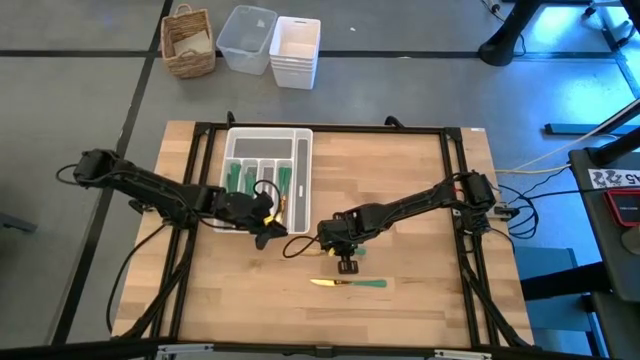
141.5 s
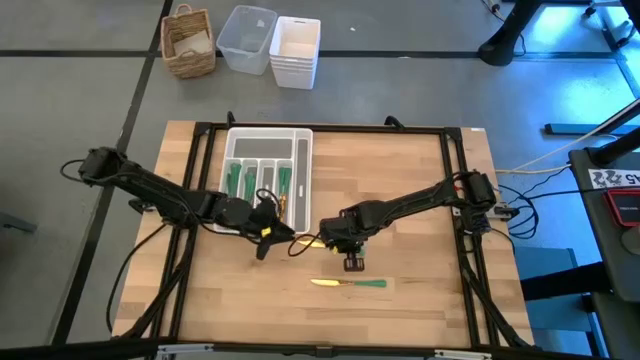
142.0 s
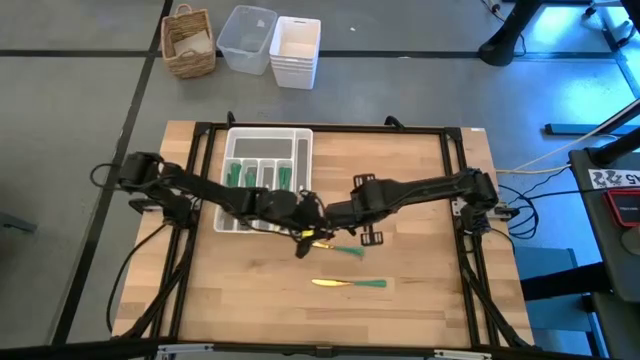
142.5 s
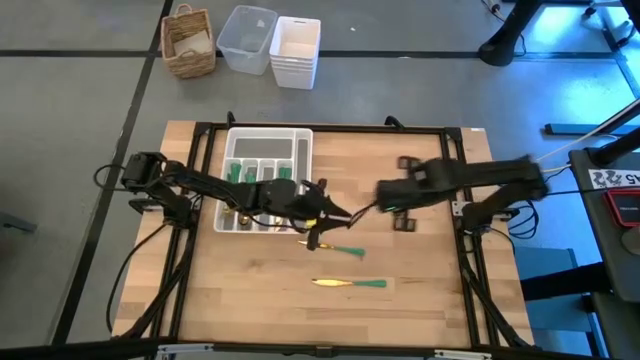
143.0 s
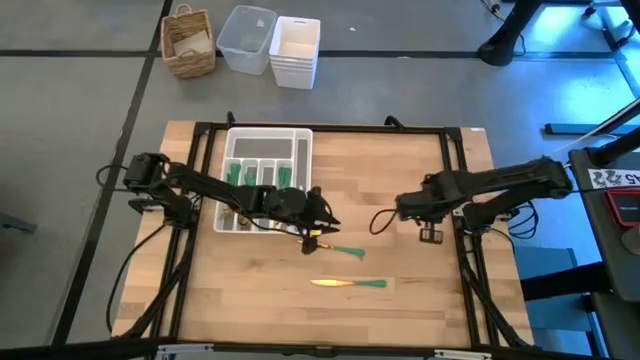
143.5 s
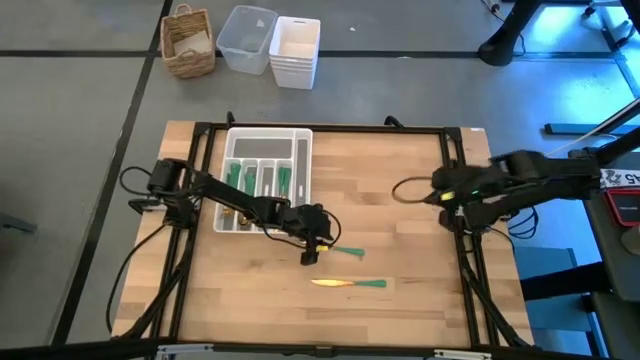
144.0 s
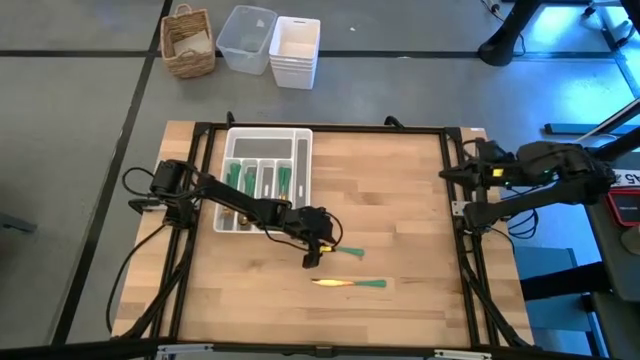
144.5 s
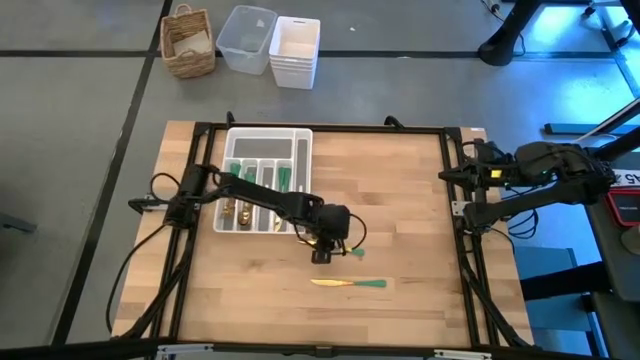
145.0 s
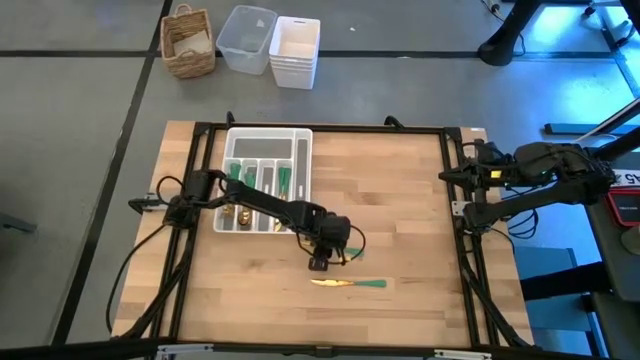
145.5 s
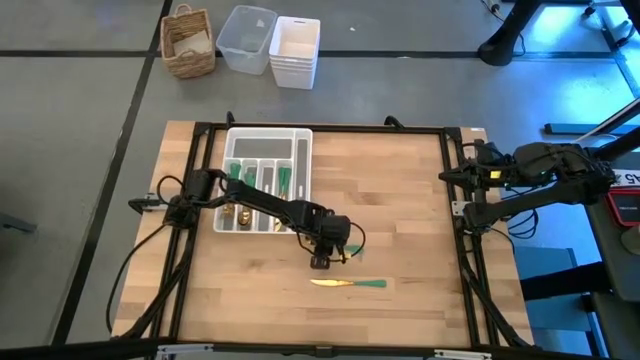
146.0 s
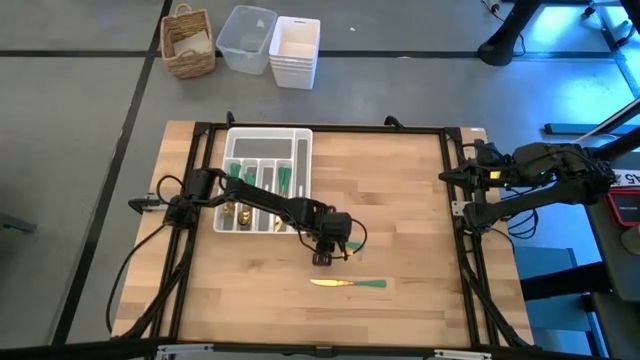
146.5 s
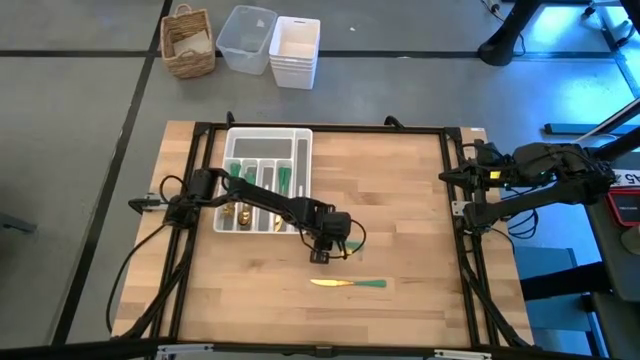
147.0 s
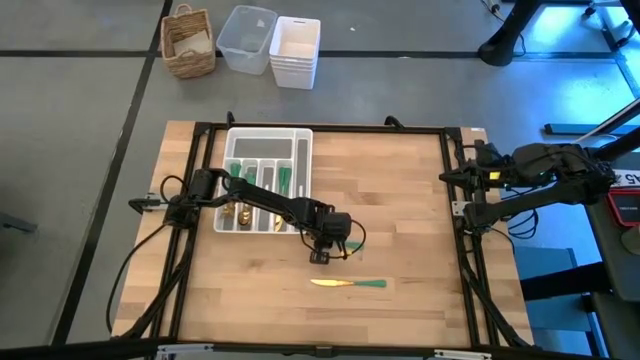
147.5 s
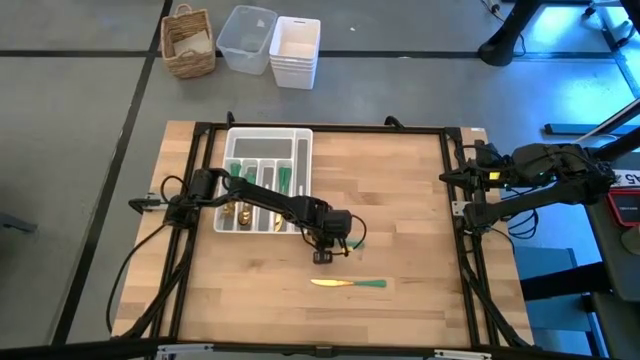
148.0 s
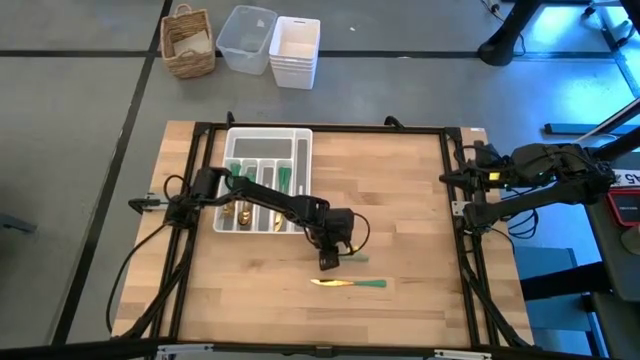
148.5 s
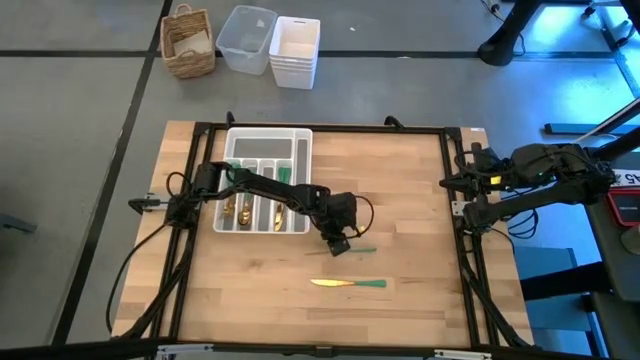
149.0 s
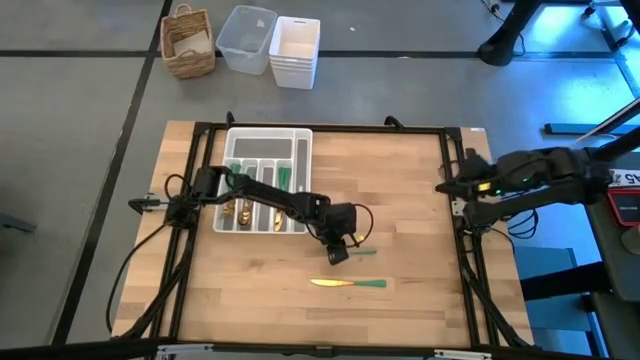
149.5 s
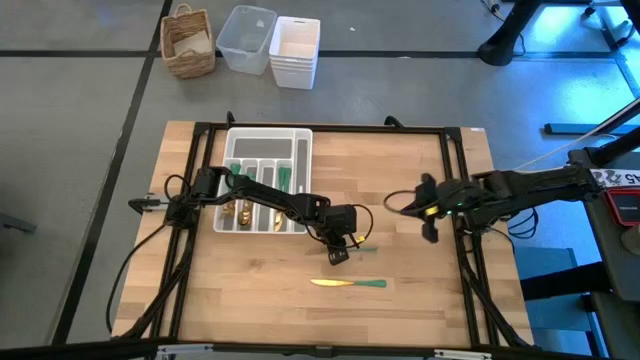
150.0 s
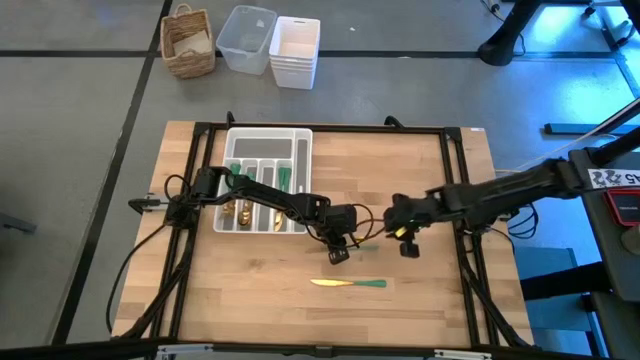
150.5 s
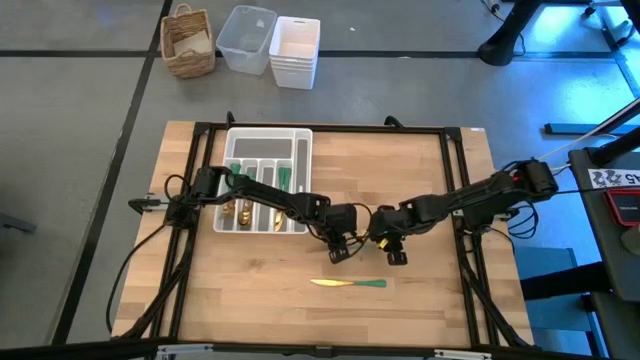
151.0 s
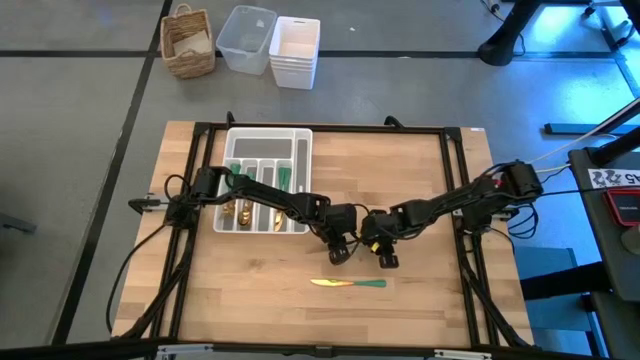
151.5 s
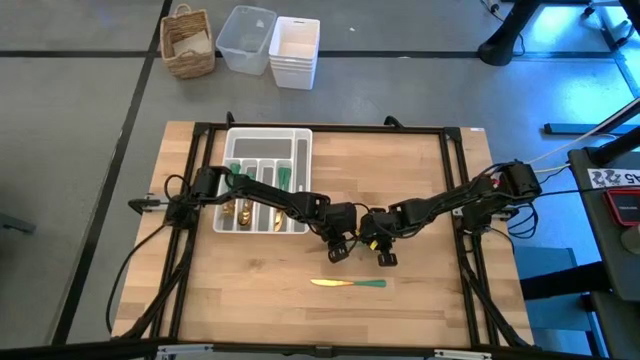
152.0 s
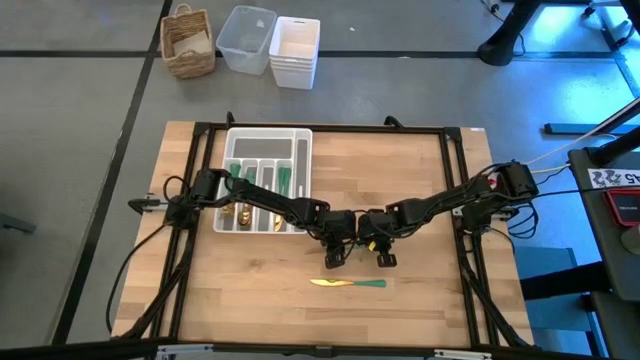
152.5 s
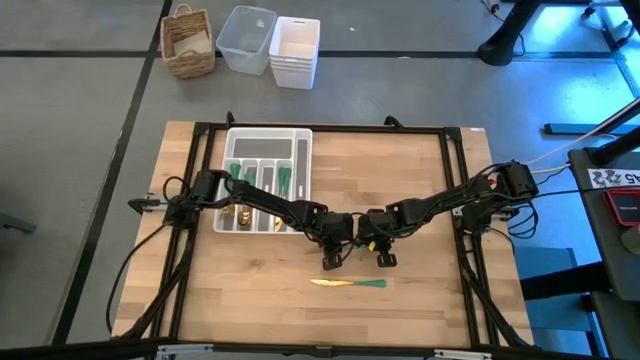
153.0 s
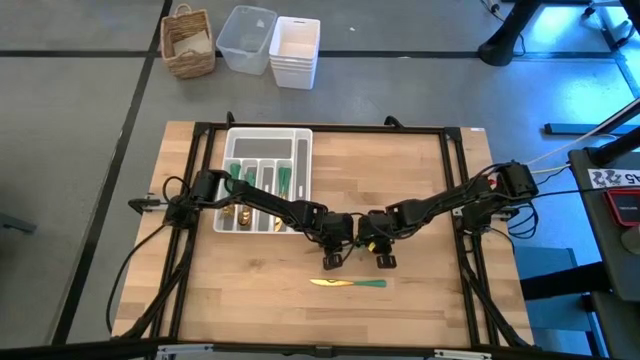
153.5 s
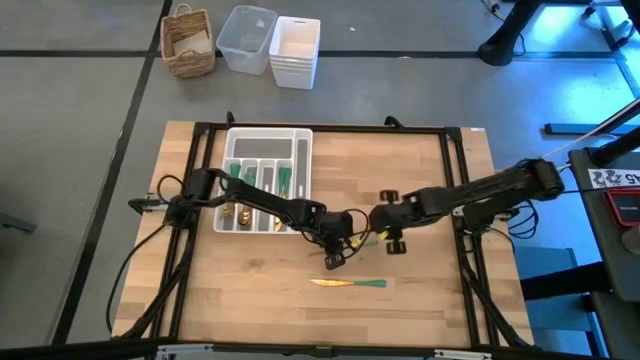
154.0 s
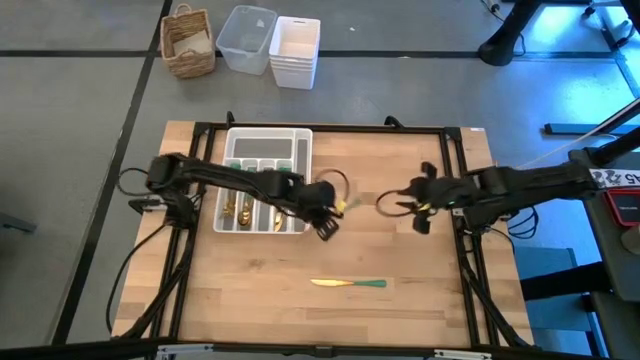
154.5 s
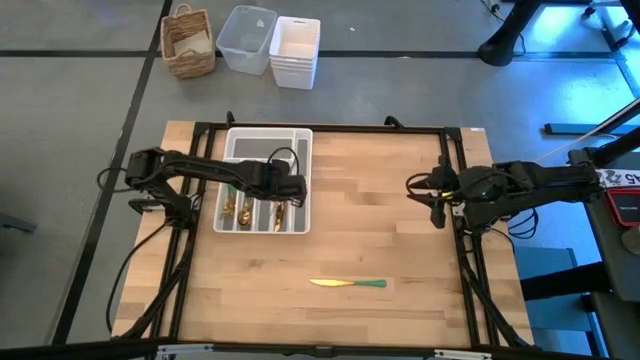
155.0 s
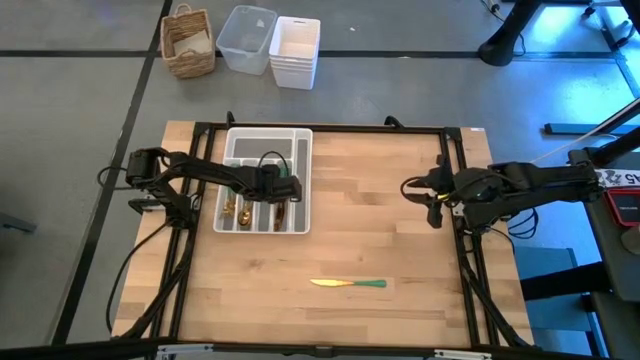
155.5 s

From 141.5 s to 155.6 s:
Task: Sort silverware
Put the green knife into the white silverware tray

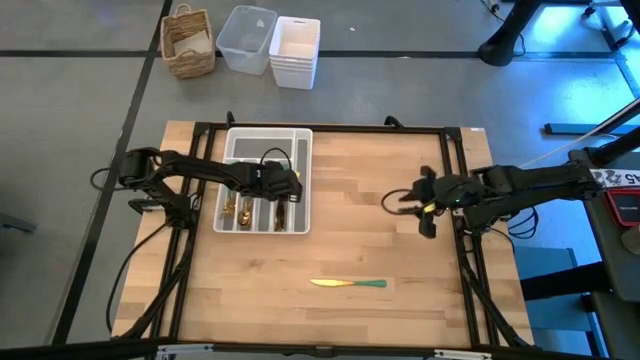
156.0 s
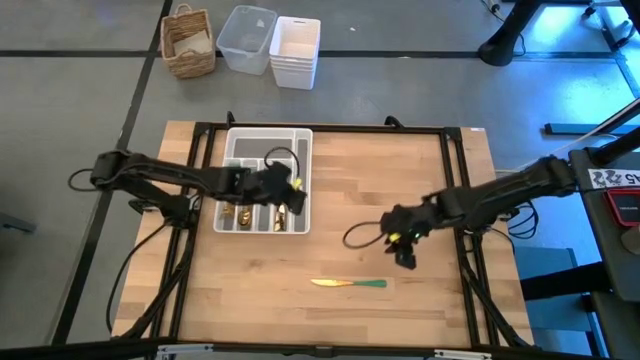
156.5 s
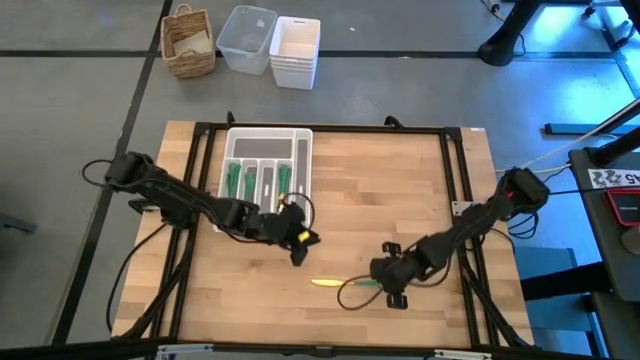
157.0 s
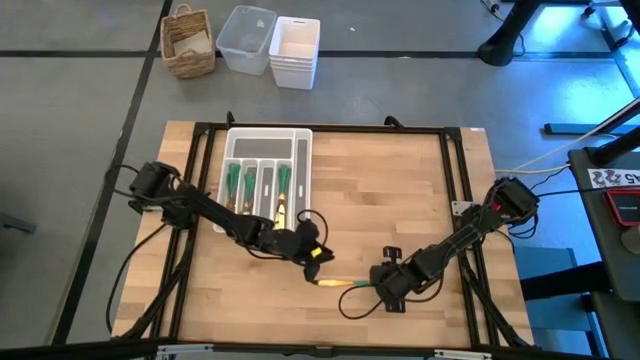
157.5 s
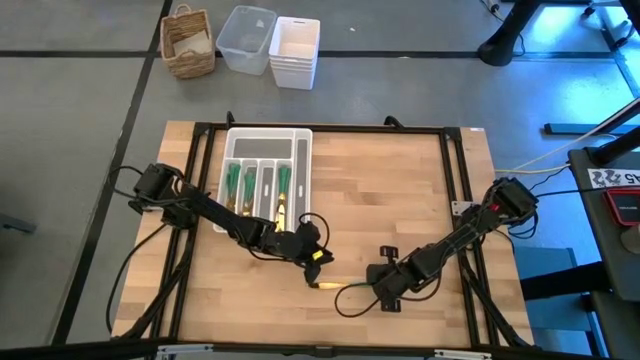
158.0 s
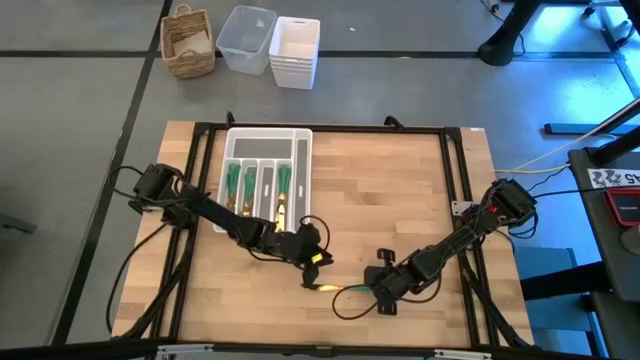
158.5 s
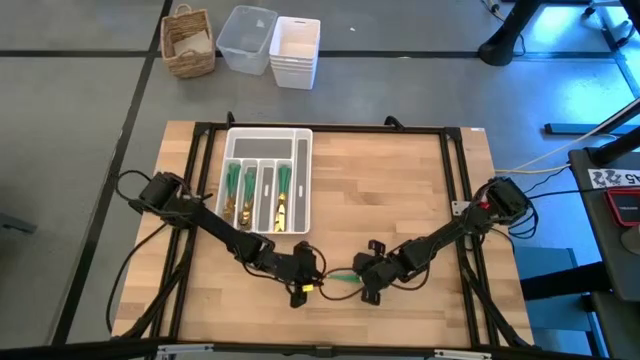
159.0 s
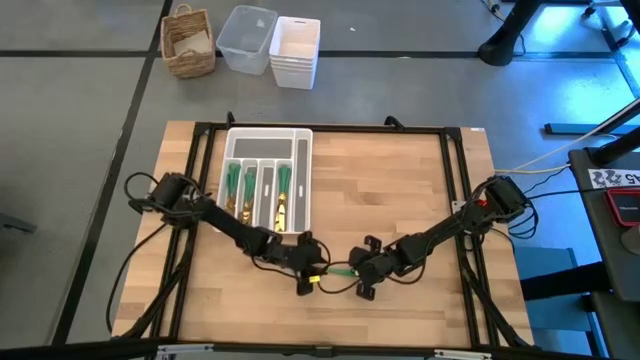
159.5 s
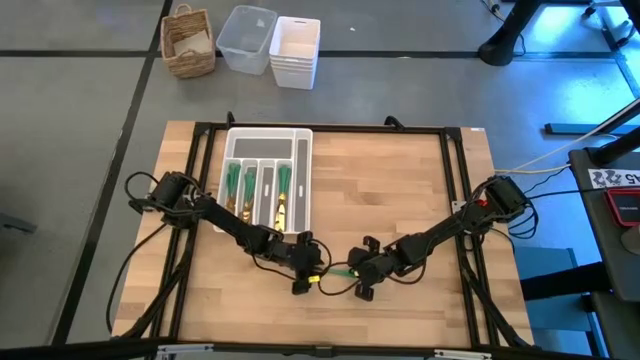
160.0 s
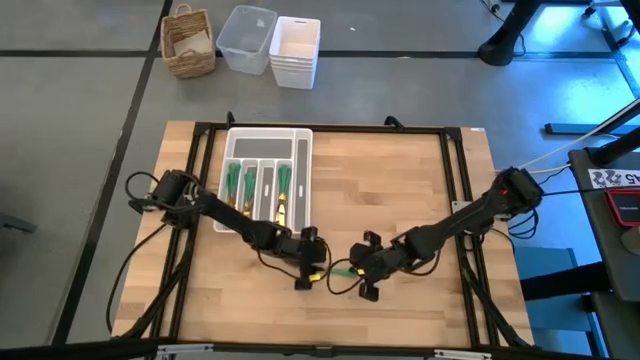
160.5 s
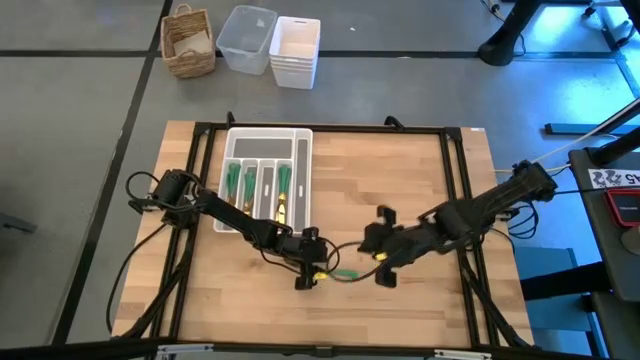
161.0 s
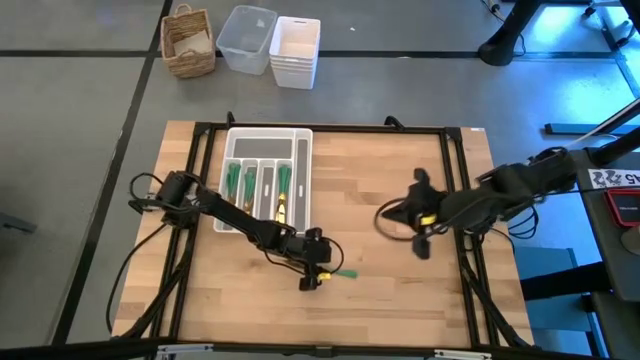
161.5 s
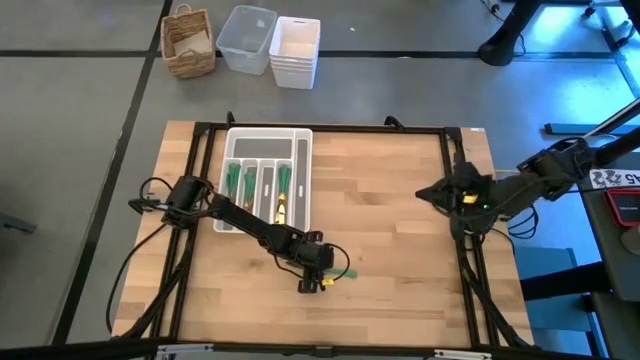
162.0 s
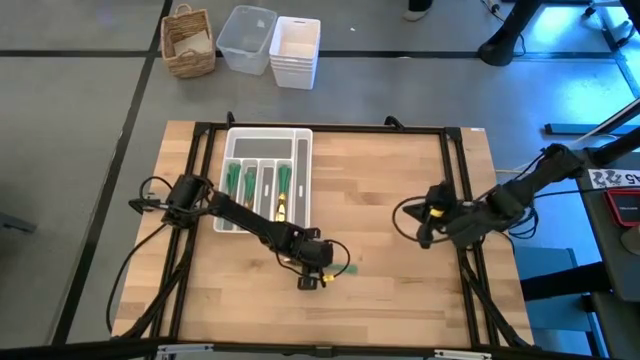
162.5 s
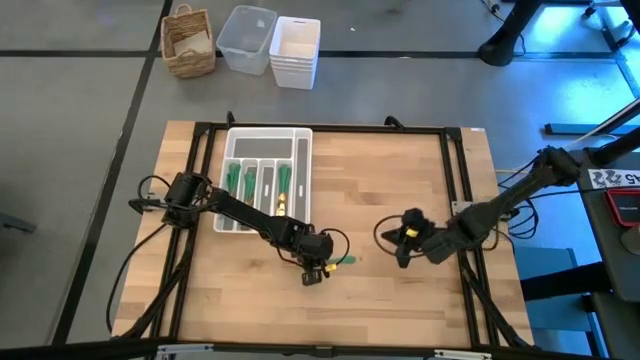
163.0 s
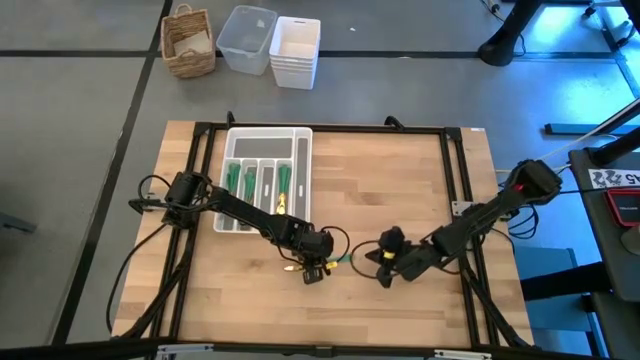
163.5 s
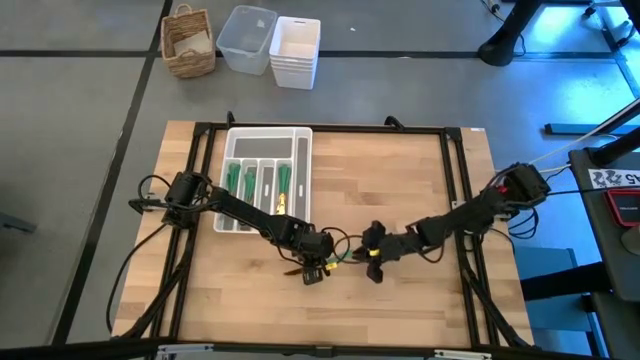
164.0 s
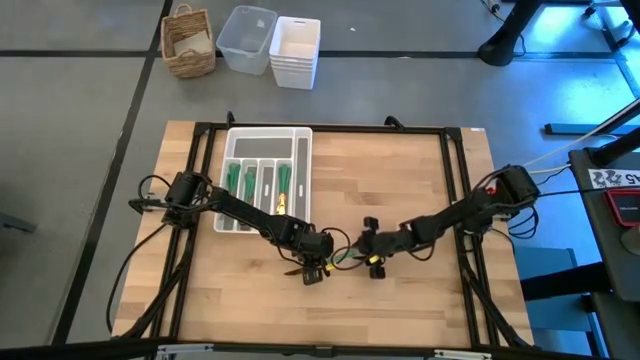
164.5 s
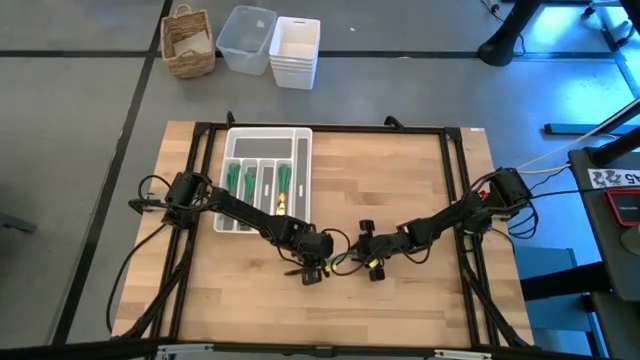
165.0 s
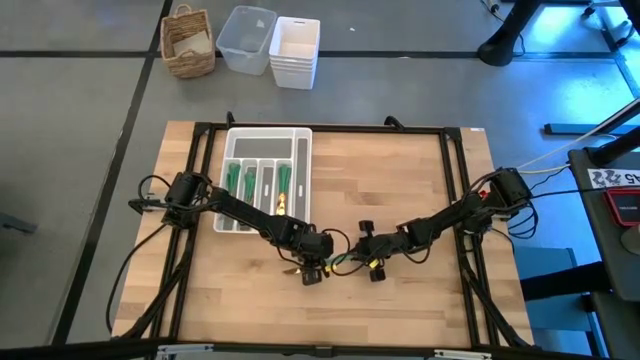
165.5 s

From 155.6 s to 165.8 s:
Put the green knife into the white silverware tray
